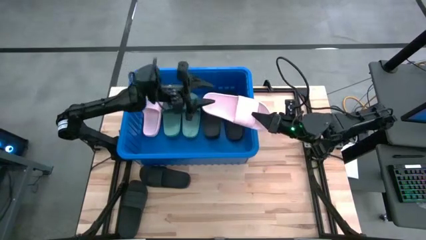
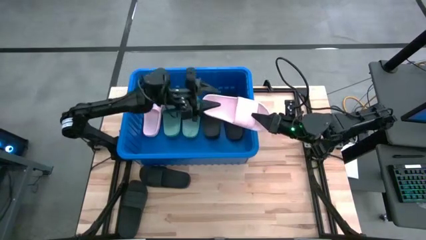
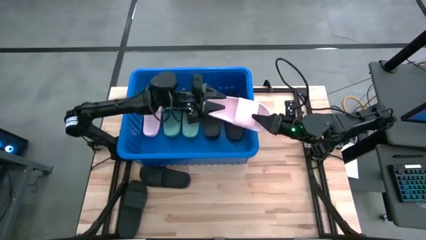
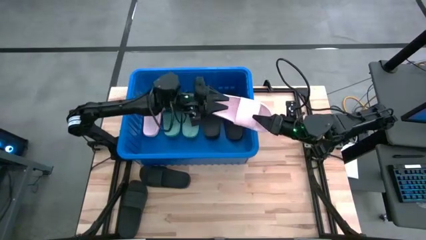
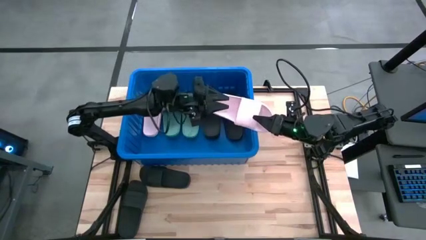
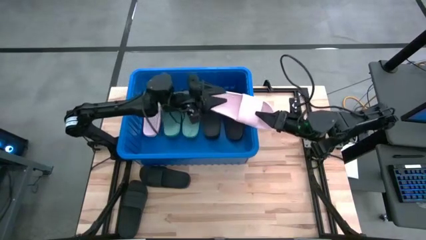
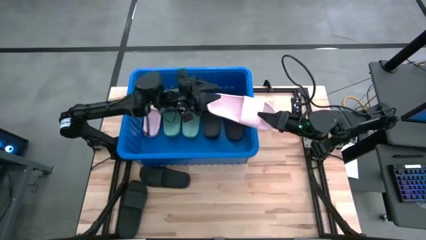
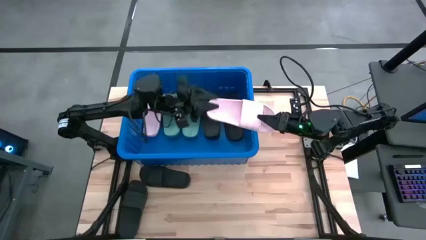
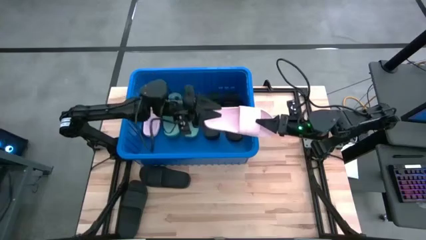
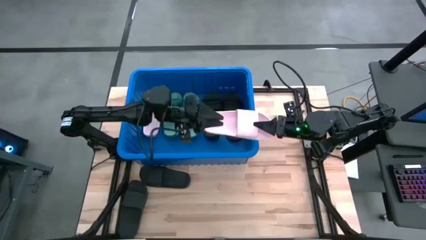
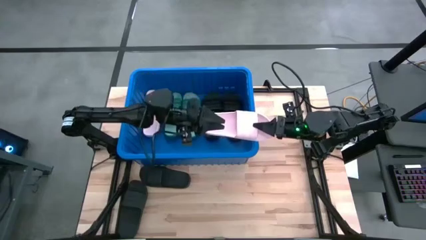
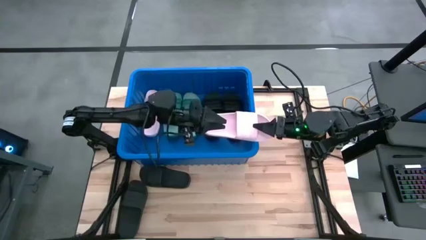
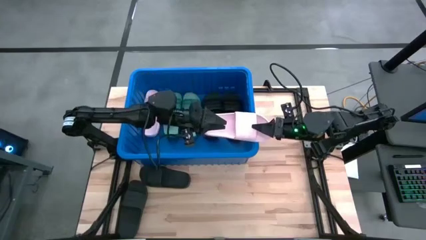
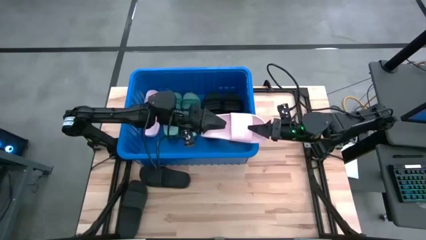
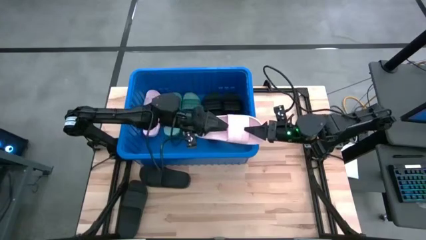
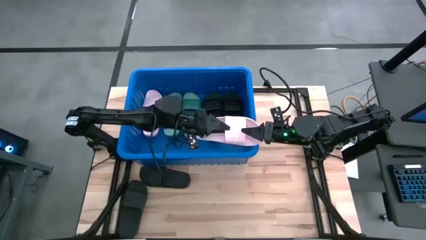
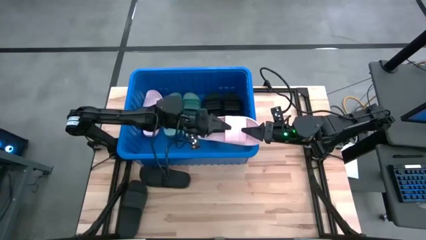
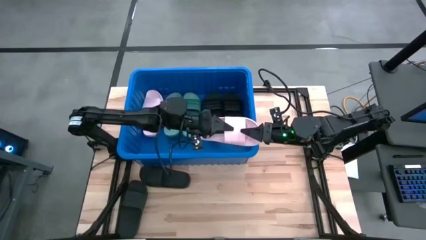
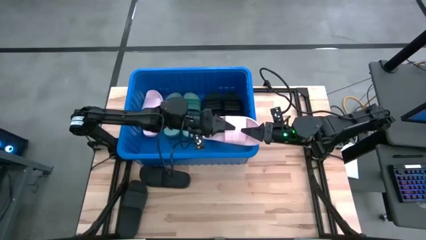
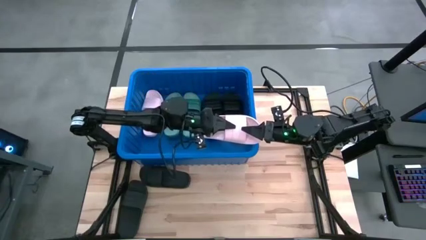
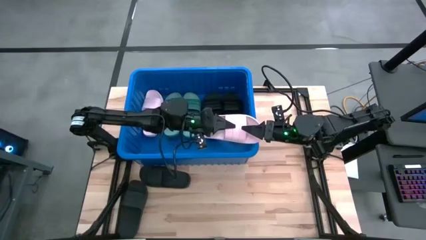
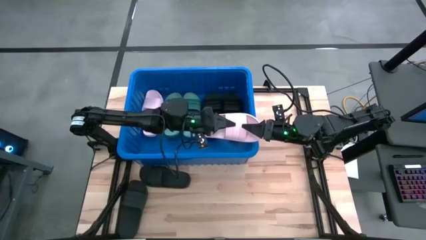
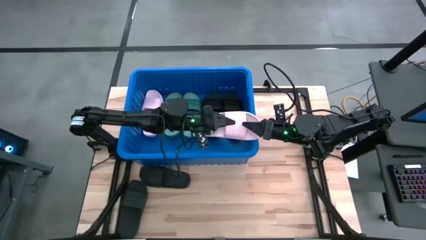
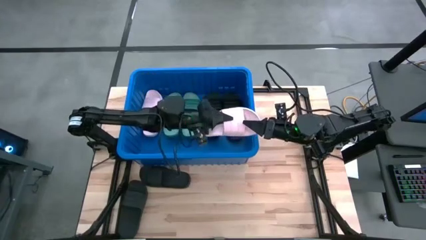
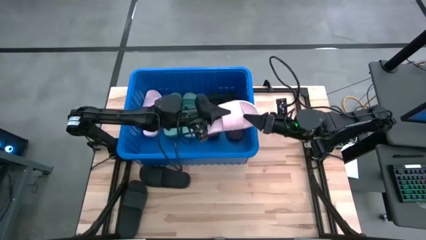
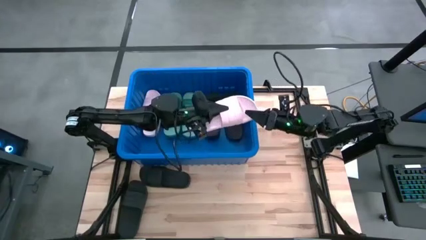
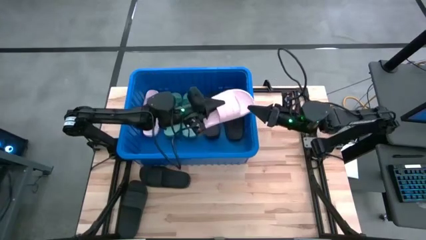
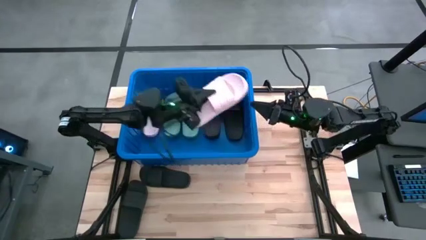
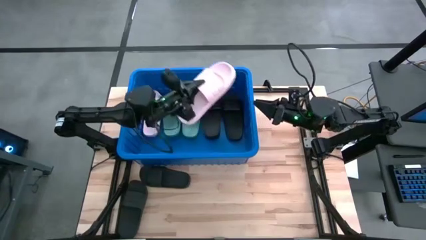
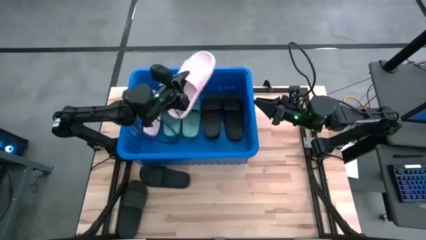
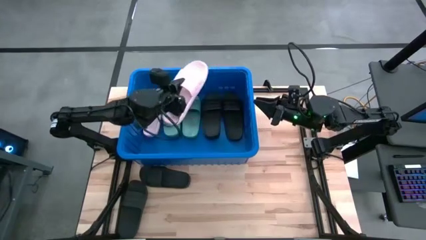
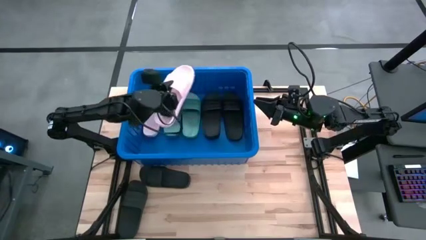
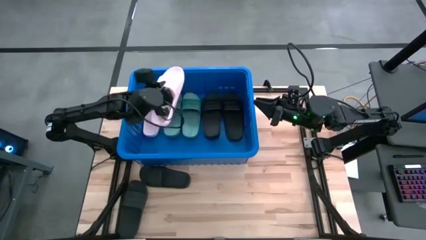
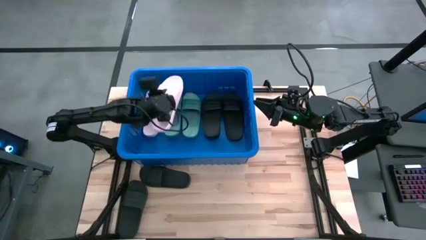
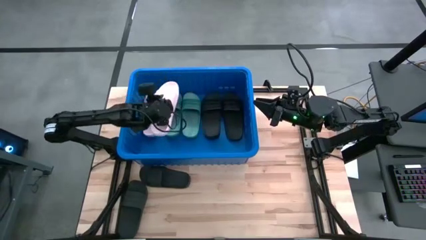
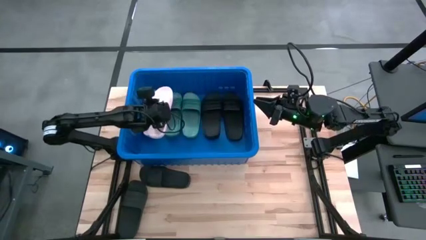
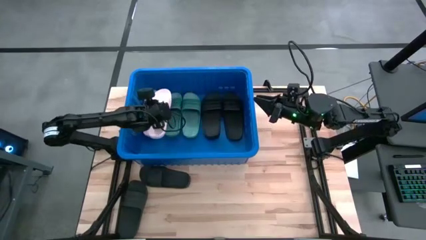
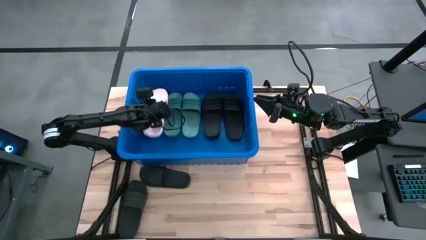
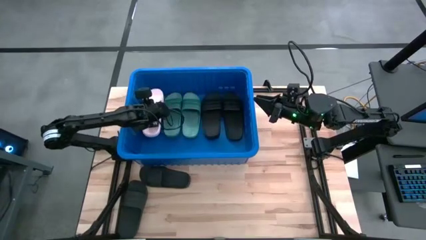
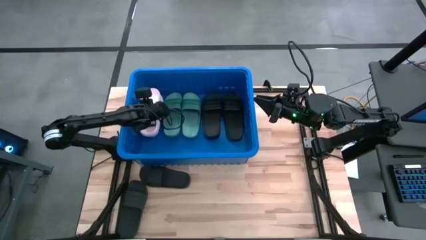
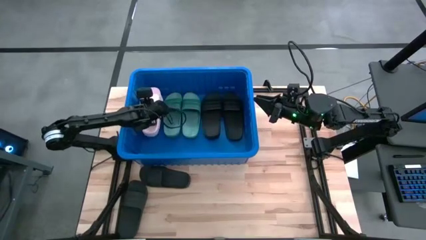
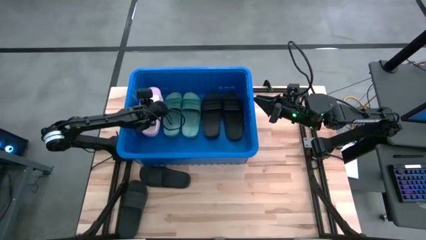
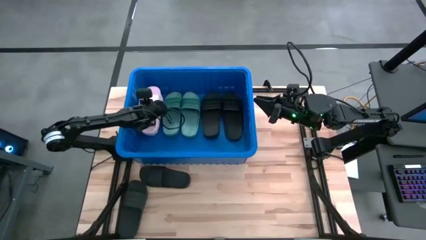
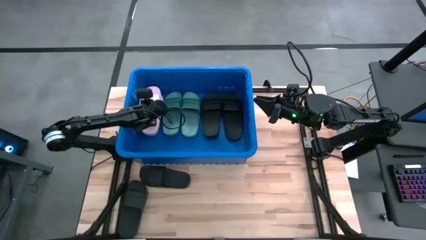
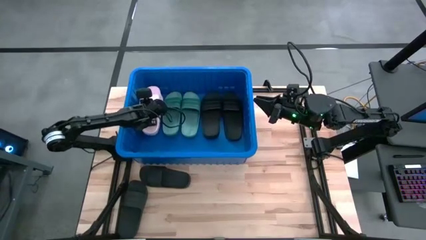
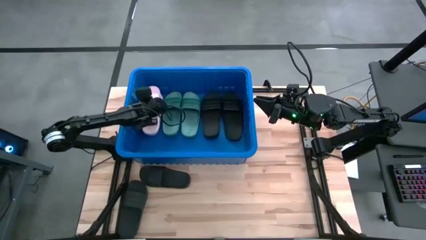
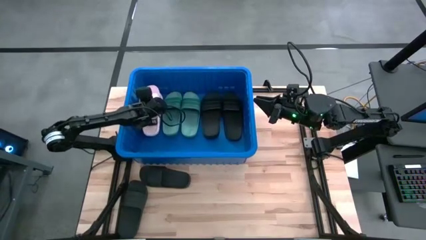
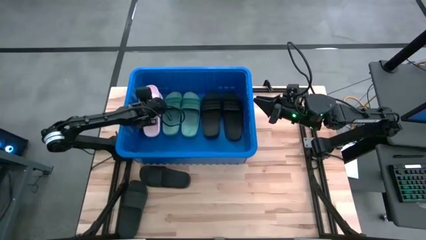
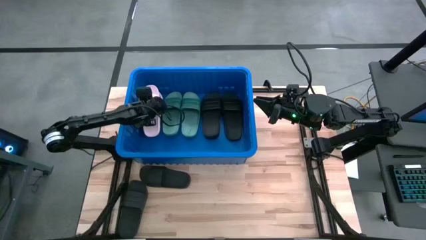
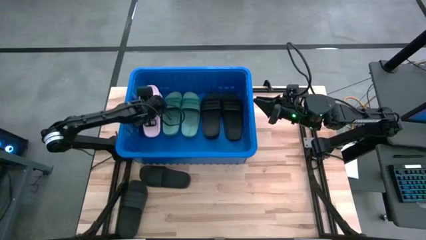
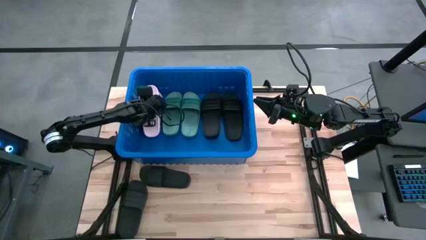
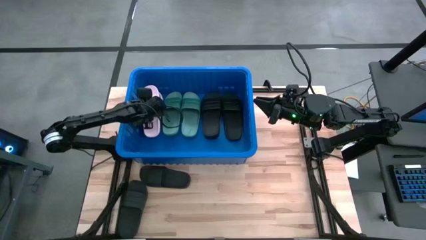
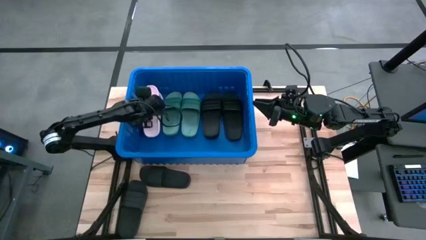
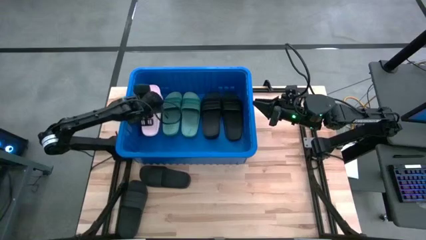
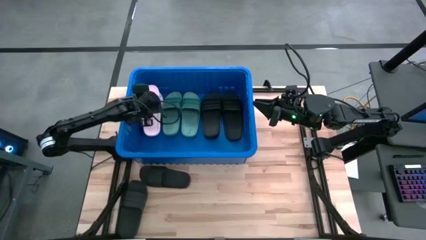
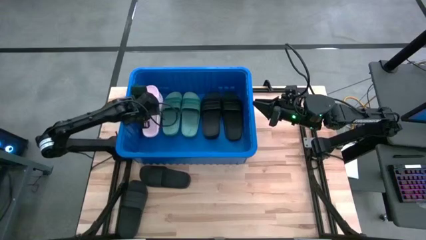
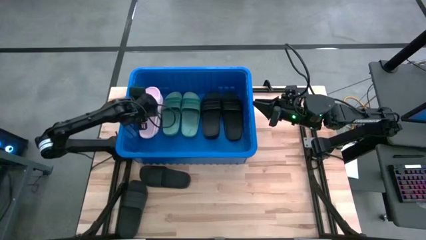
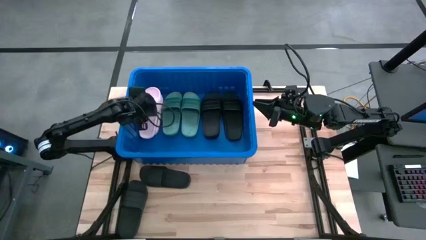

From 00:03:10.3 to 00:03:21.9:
Task: Pick and place slides into bin
Put the pink slide into the blue bin

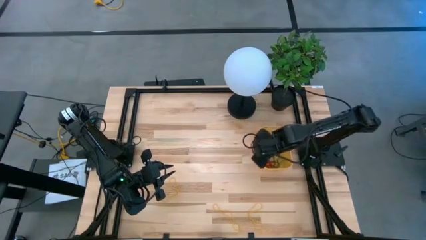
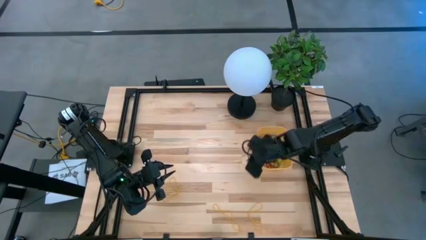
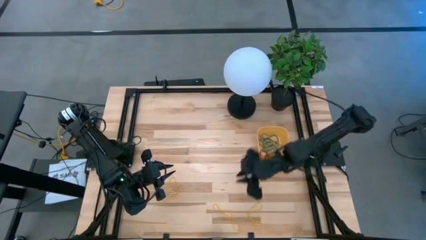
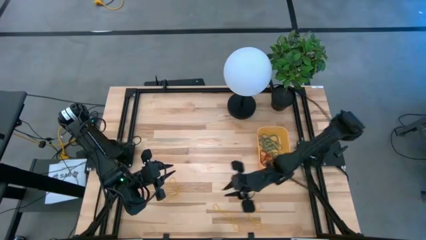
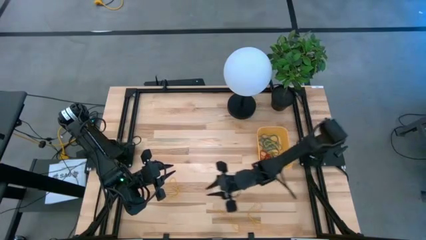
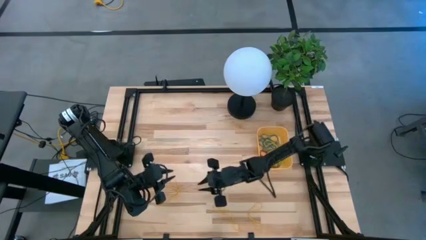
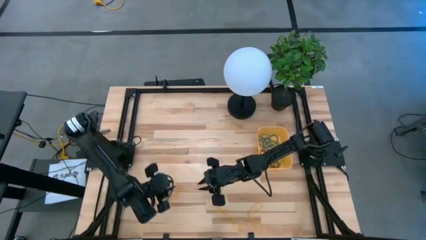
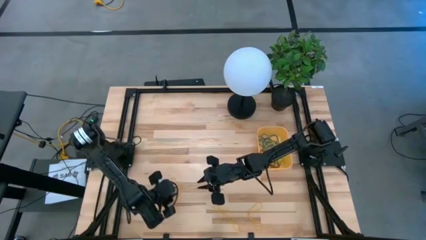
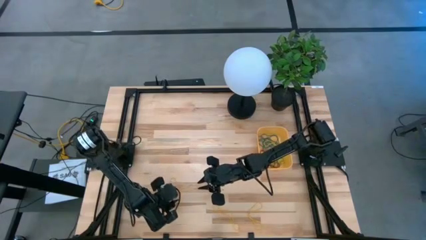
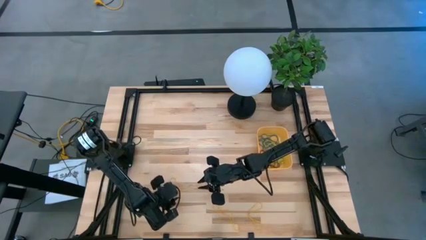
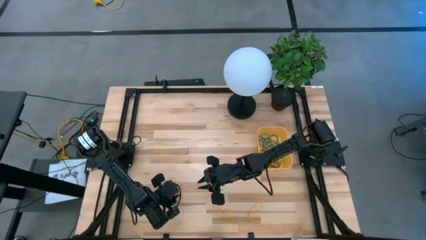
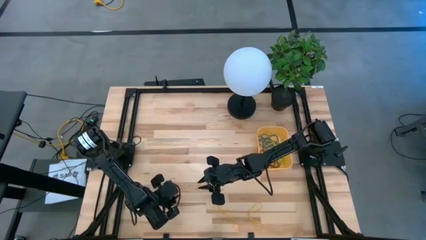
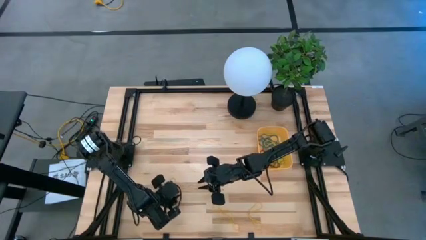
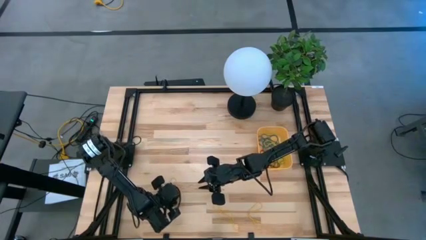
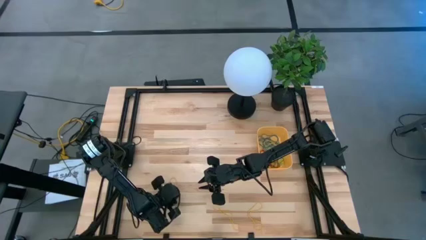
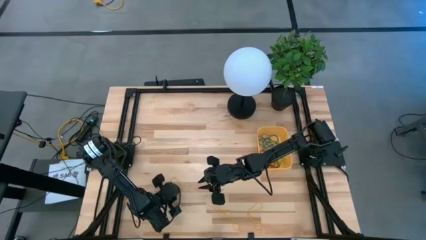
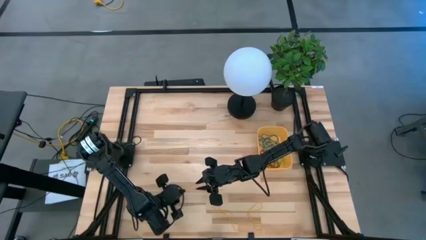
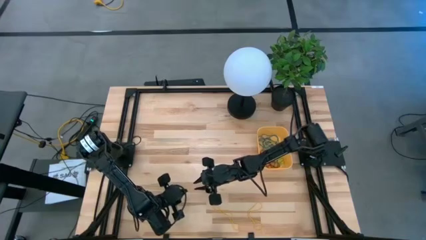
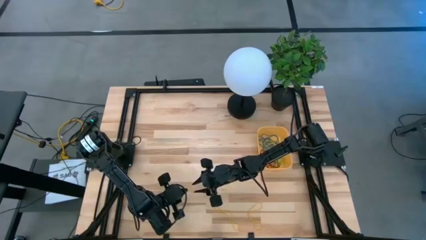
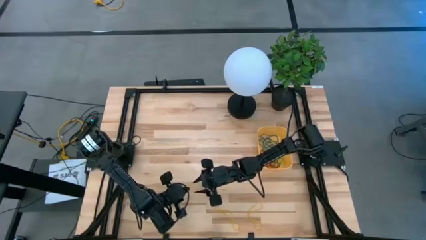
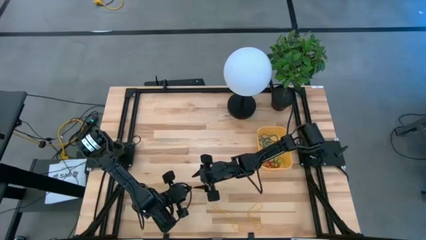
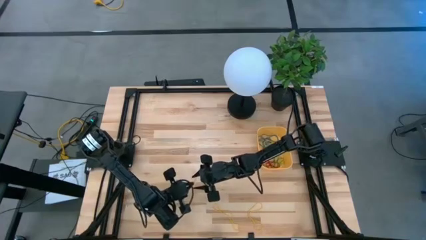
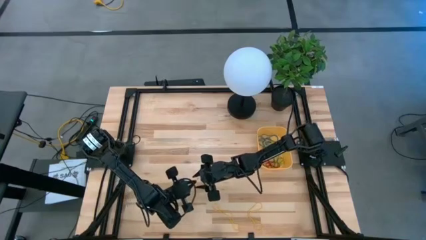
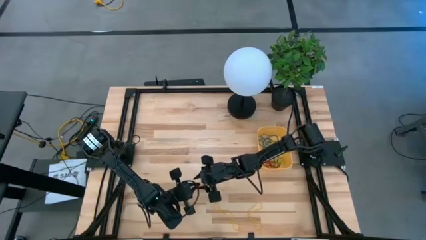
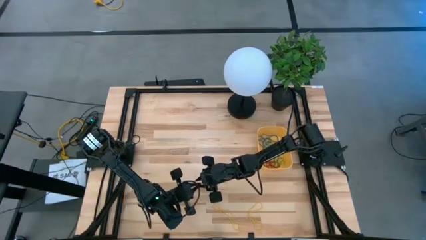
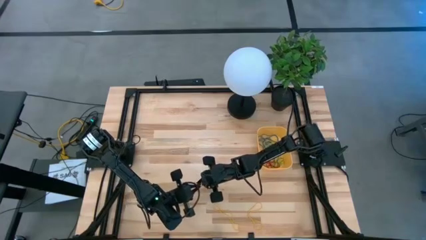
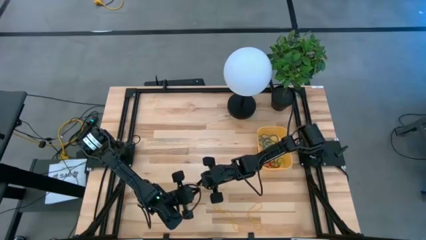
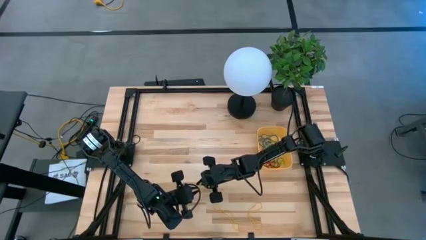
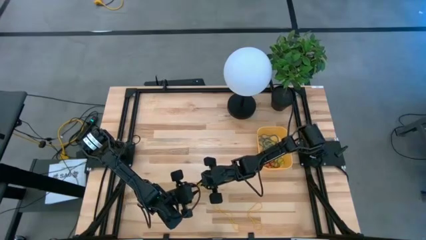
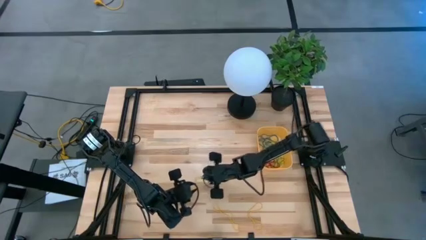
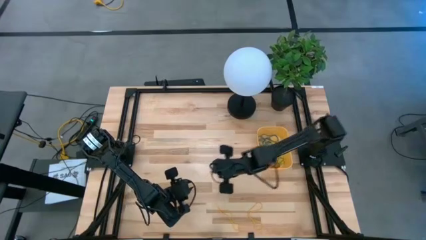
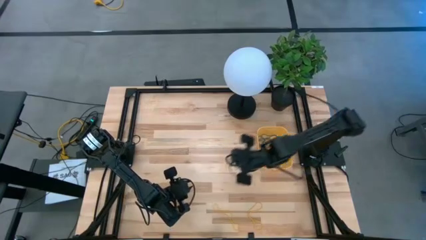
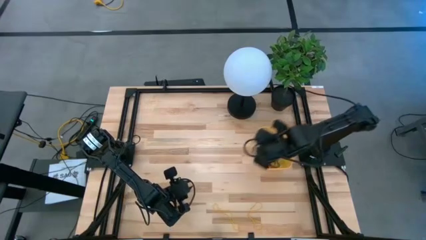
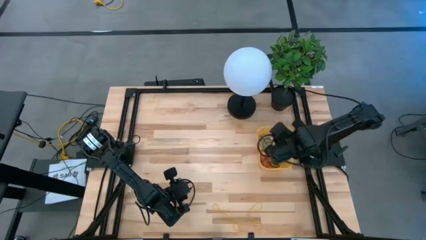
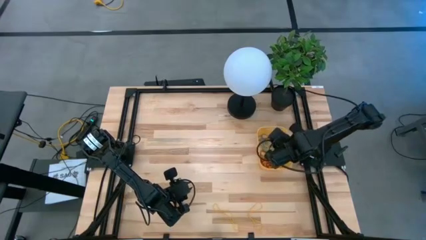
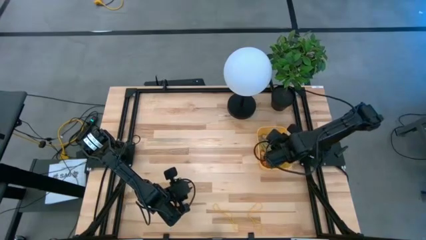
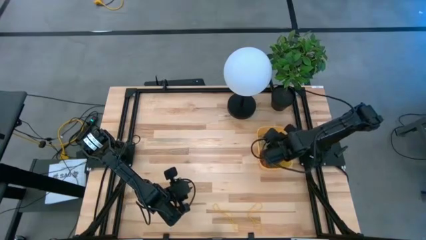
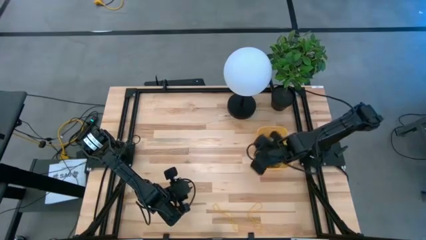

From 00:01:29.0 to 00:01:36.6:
Task: Pick and place items into bin
Put the yellow rubber band into the bin
